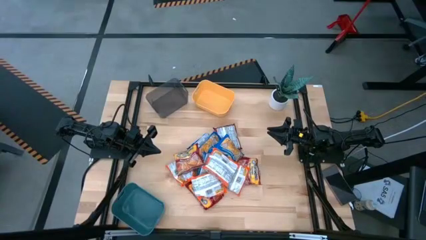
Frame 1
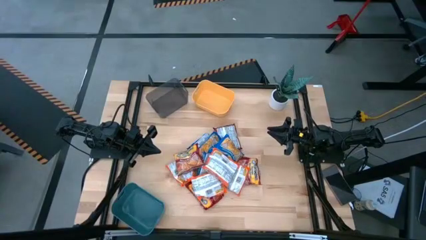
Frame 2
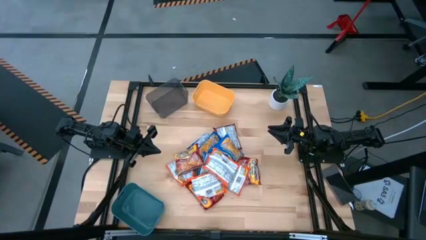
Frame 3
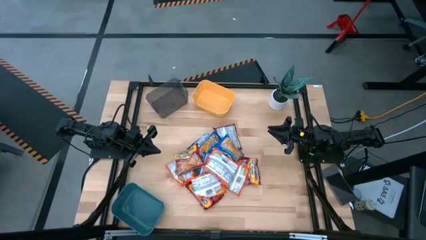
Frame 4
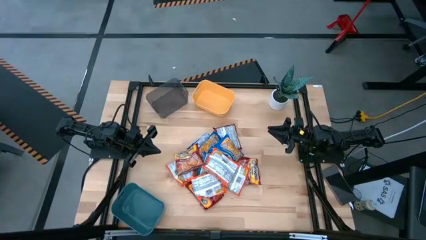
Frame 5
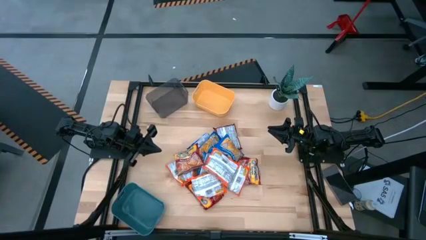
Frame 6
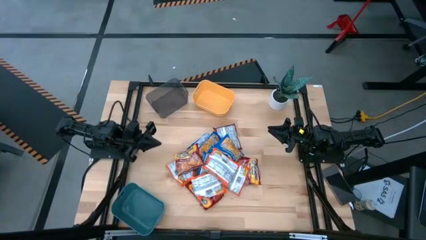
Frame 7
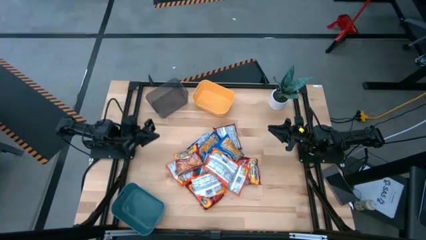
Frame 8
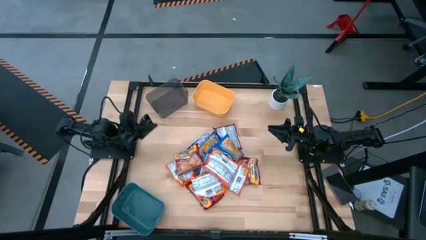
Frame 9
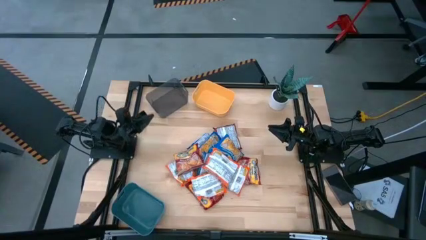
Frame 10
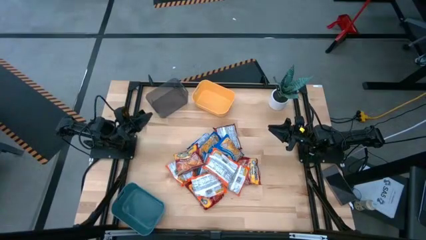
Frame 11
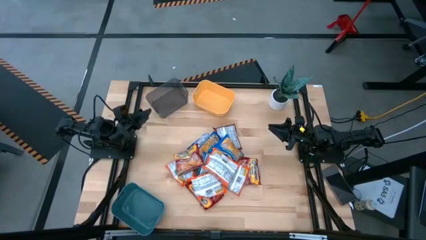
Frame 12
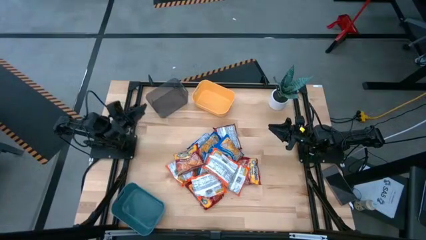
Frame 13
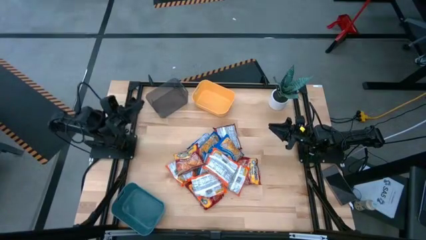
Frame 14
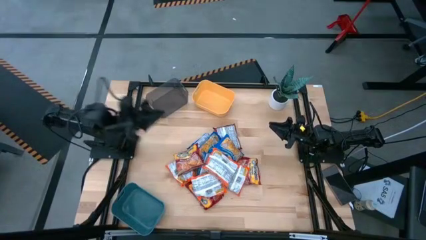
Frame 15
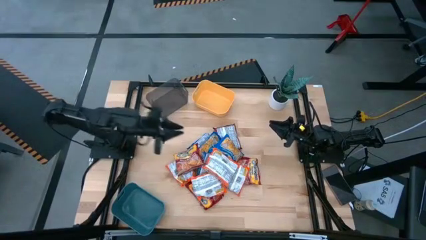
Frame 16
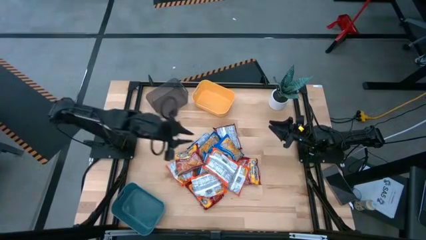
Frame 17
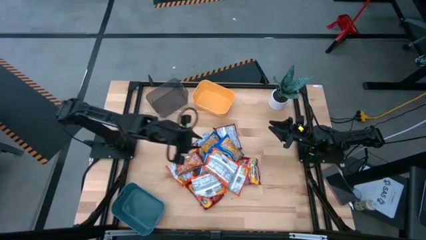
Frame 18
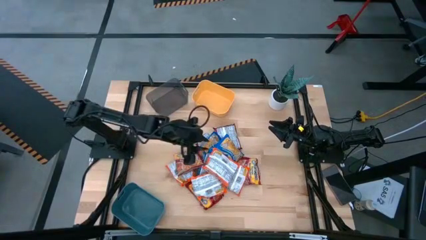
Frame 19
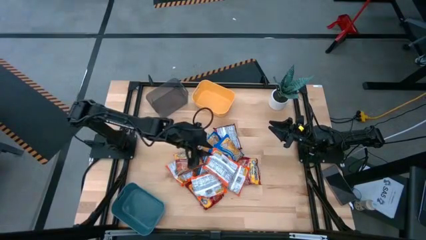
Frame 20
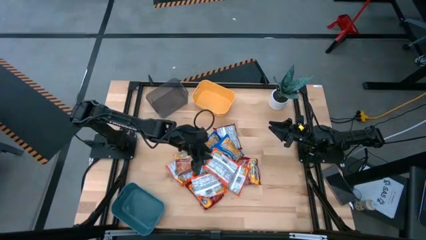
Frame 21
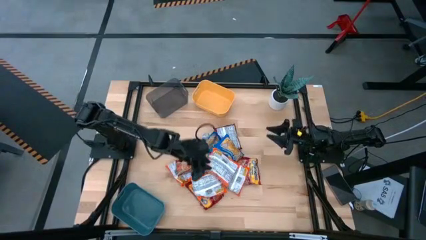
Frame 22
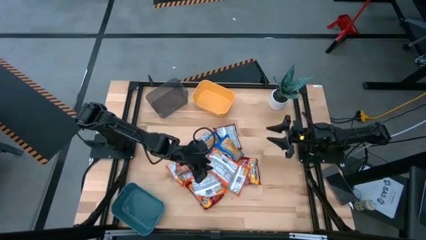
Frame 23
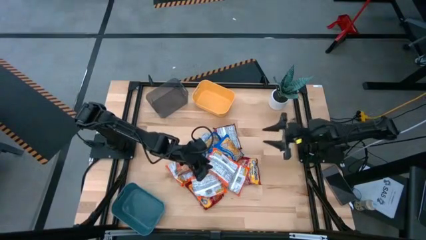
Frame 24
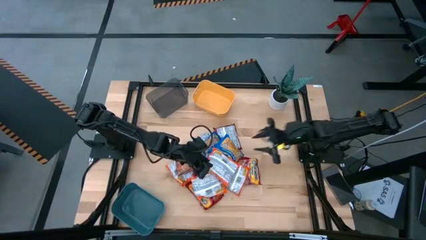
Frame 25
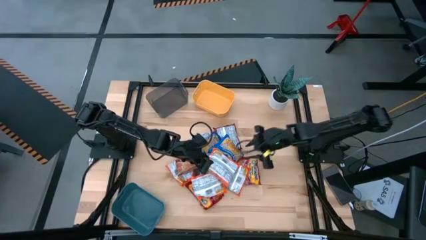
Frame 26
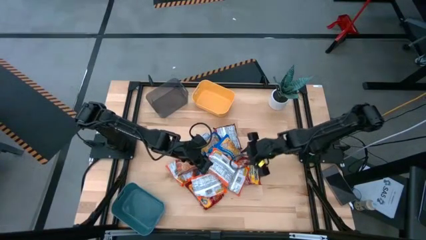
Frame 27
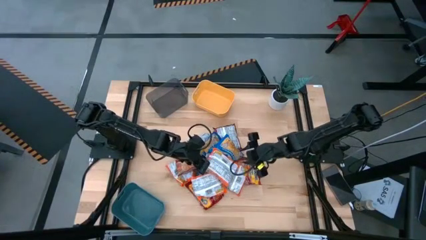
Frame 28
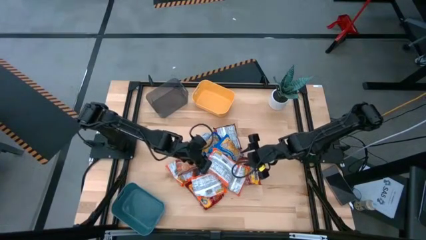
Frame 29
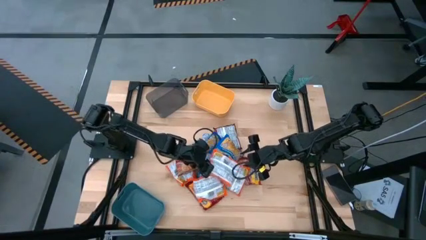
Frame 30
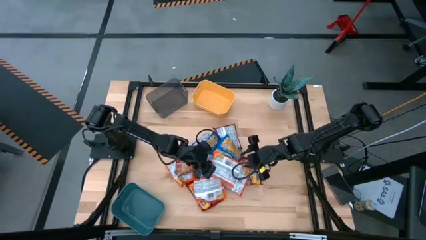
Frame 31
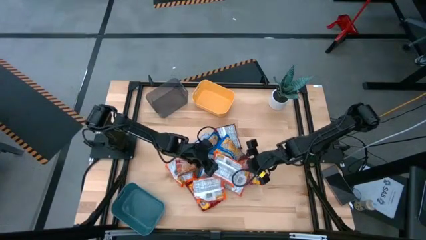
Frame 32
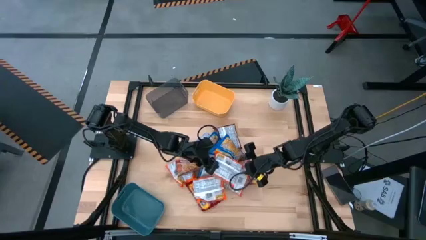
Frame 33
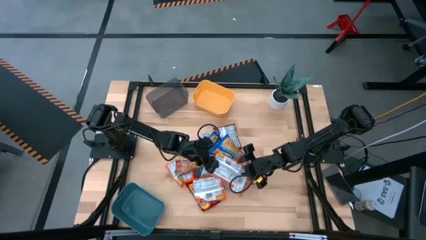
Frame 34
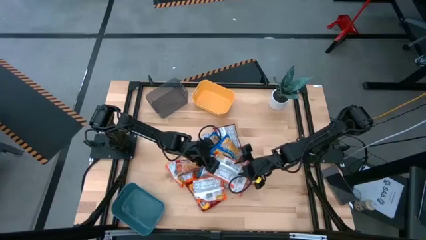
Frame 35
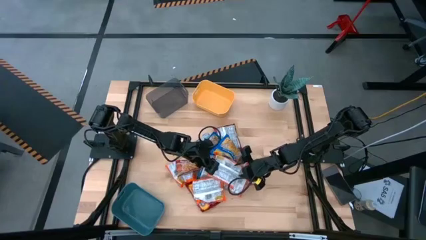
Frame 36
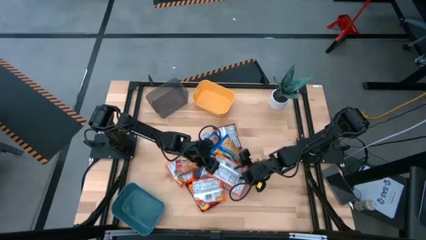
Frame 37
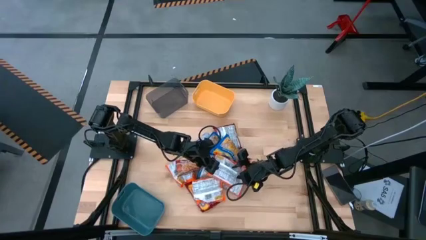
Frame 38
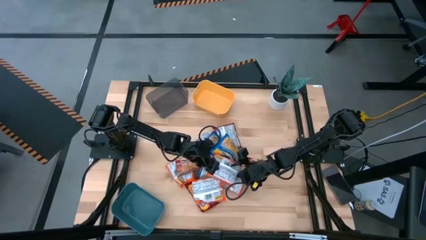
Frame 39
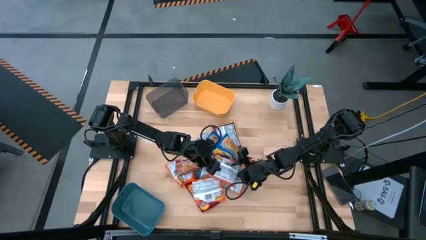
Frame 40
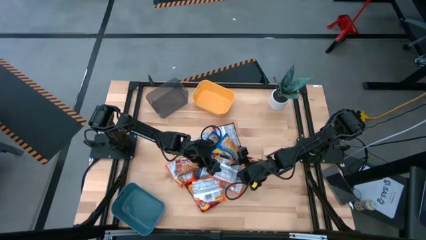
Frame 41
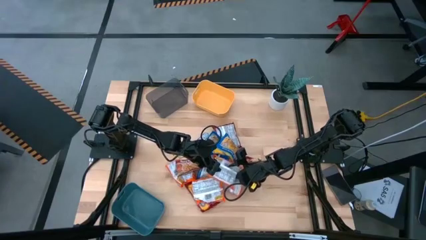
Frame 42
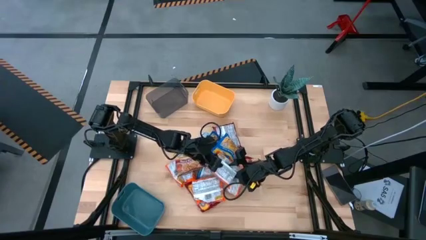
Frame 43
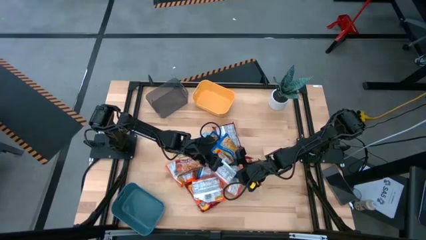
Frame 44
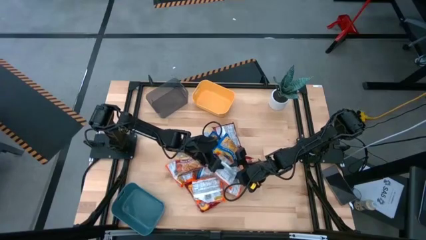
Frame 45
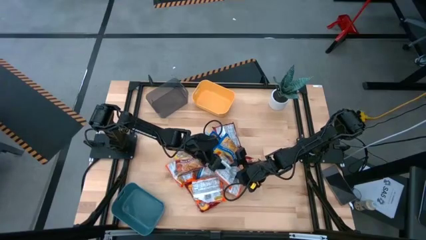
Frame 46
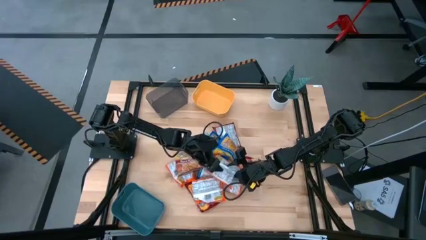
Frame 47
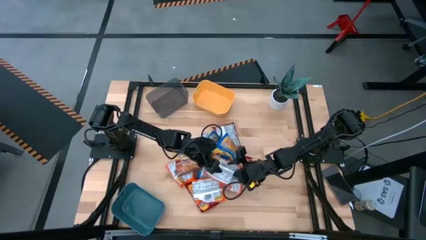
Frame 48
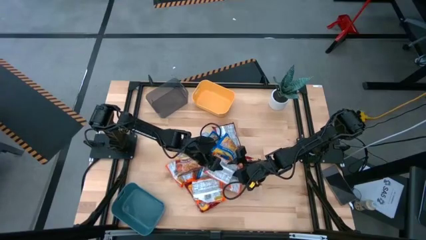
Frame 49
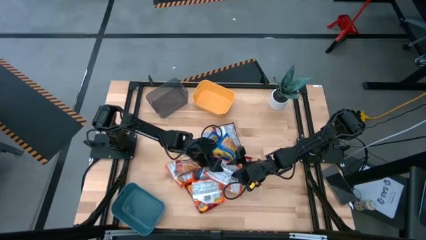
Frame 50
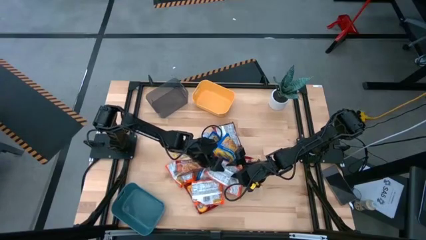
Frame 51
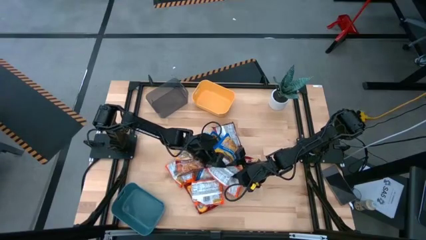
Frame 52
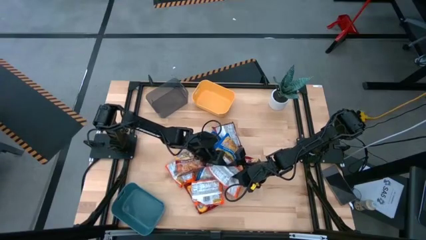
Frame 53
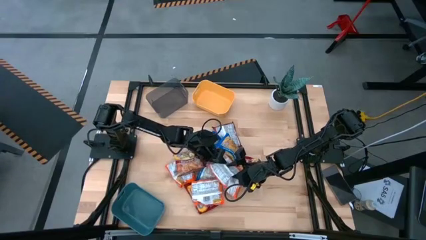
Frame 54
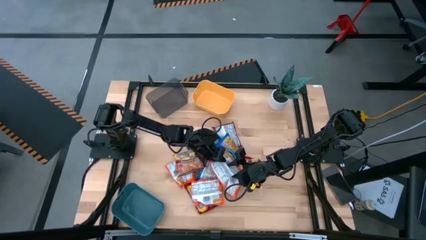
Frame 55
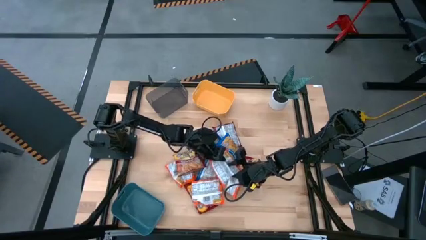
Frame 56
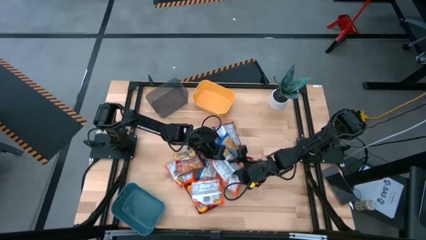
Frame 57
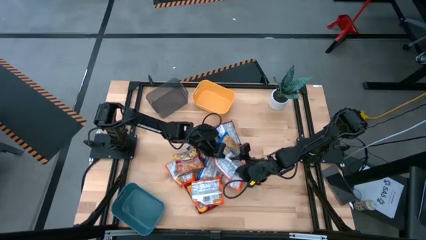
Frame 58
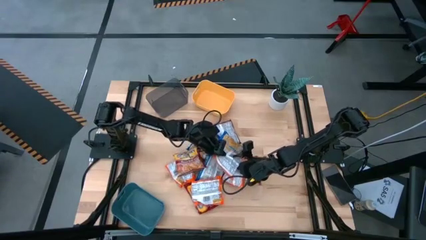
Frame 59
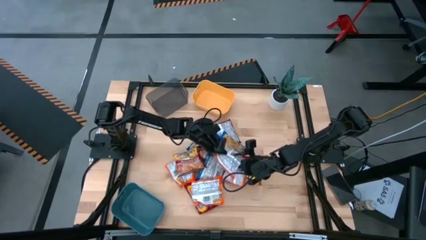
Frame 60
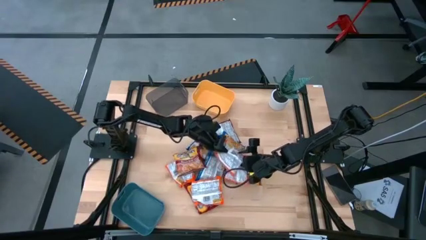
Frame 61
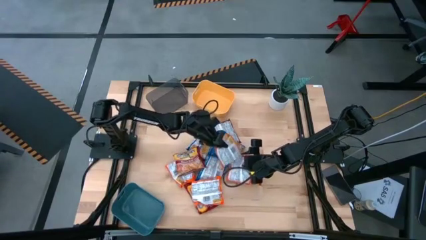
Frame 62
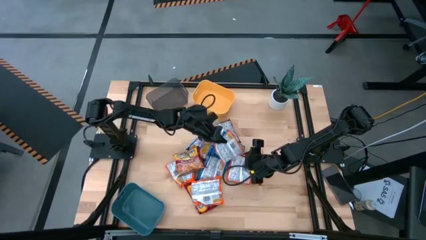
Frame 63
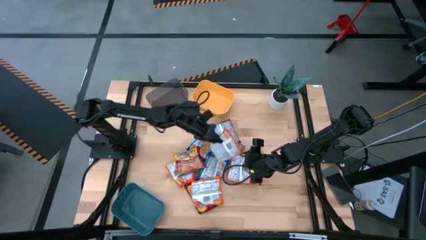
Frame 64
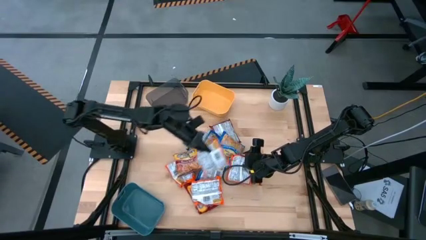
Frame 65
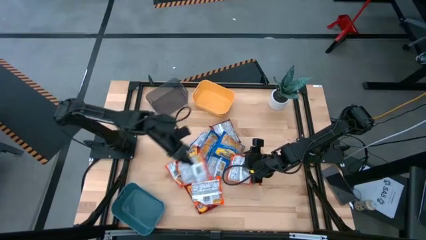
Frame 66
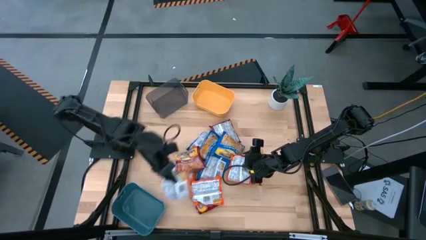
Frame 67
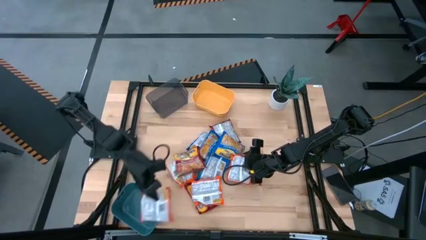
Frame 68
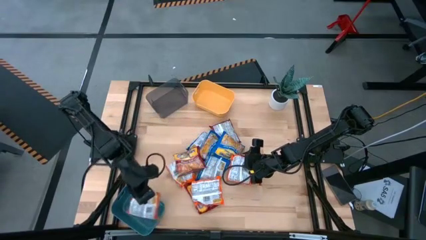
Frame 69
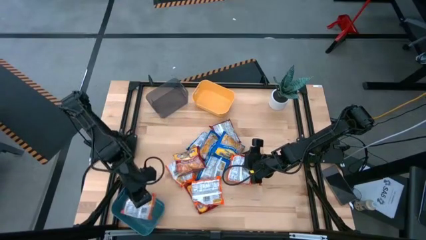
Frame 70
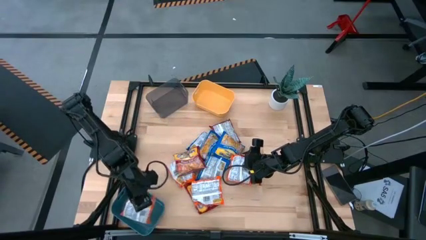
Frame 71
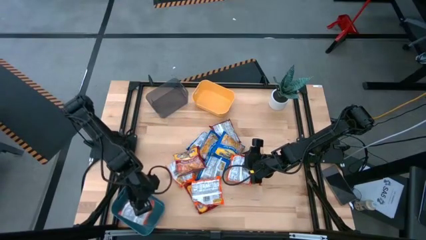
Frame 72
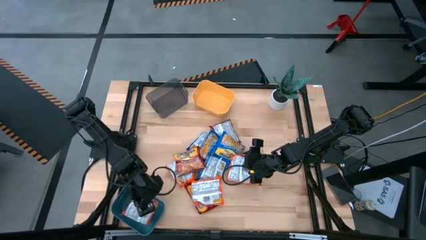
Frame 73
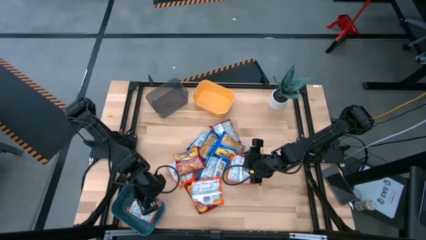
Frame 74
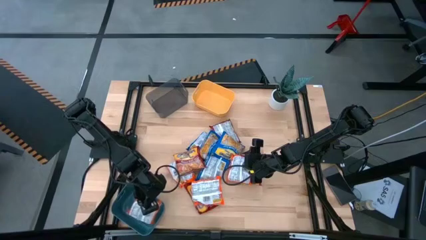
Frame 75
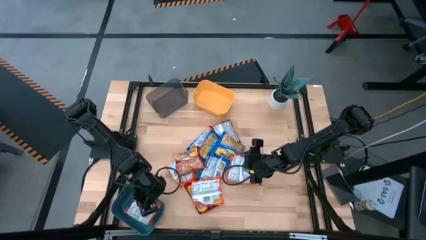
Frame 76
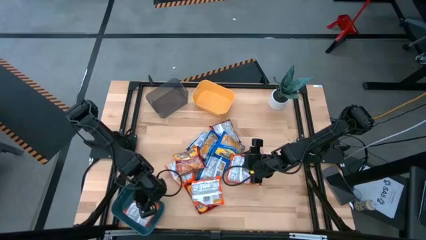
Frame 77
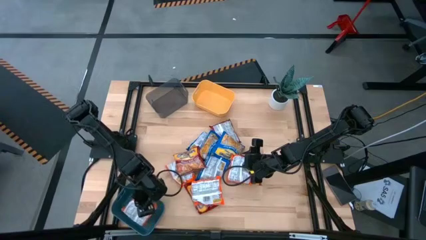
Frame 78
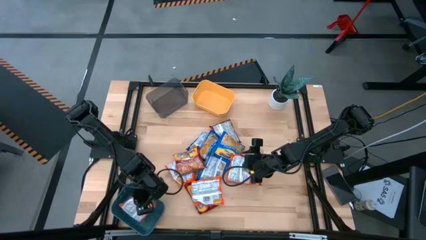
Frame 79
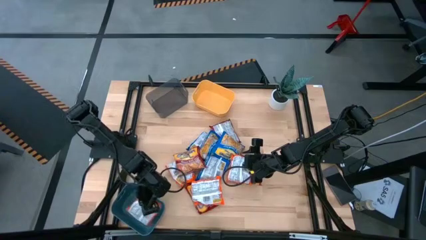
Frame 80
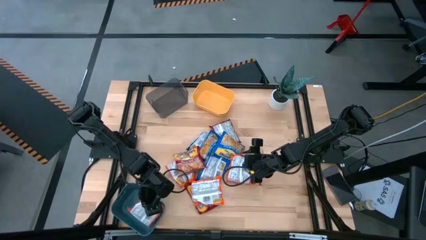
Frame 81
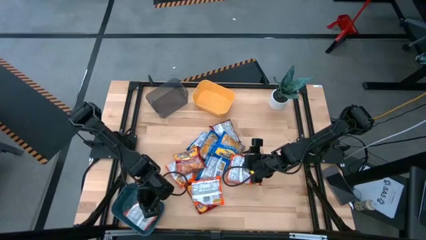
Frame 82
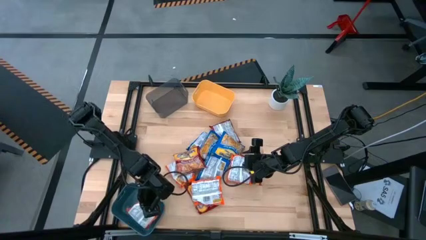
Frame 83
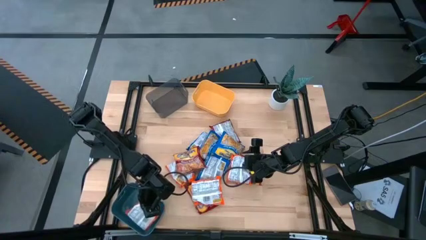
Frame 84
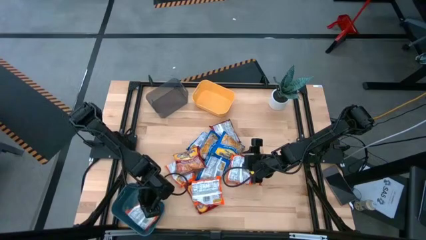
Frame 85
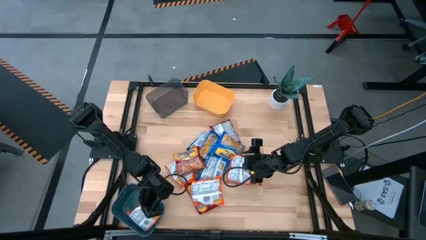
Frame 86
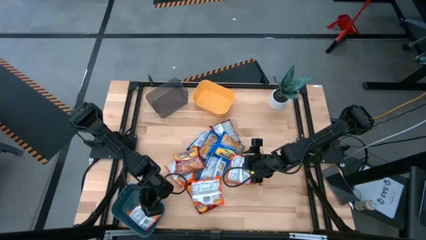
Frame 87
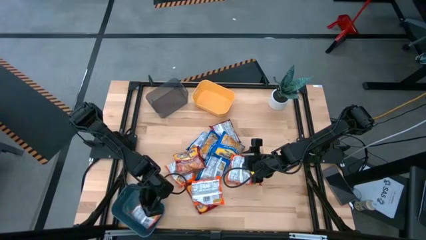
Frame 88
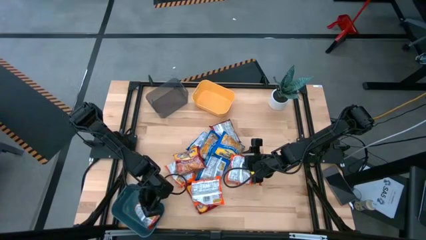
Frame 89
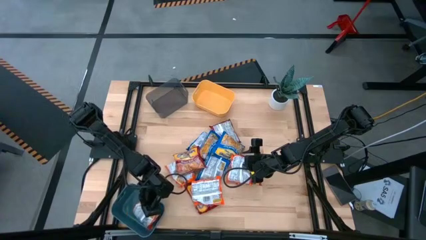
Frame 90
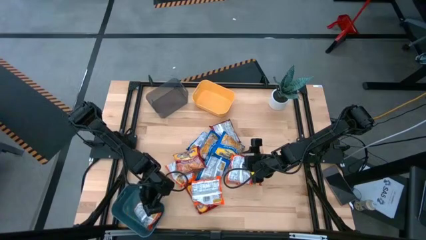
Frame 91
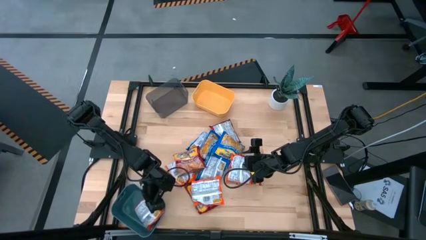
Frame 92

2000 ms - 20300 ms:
Task: Sort Maruchan noodles
Put the orange noodle pack into the blue bin
